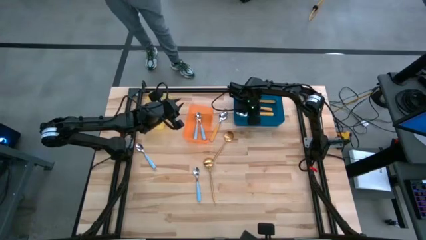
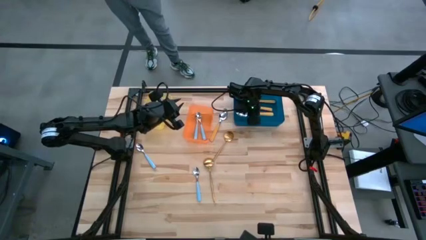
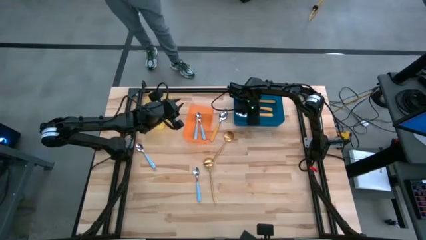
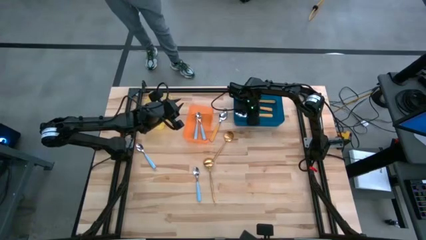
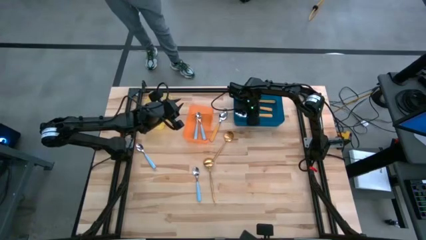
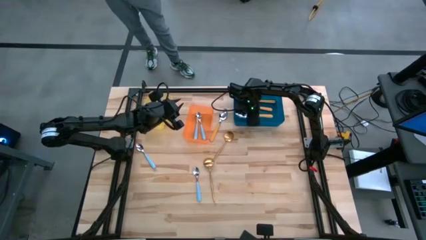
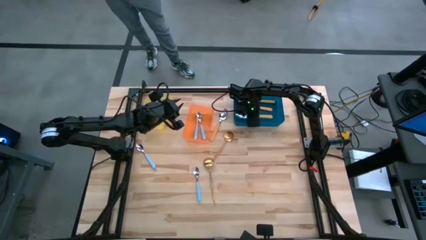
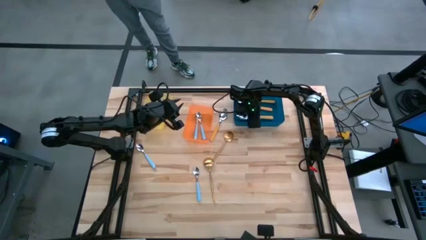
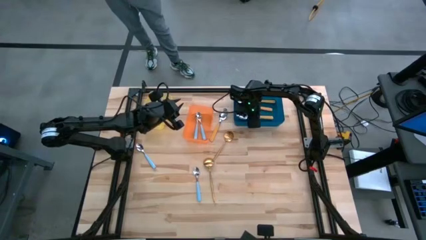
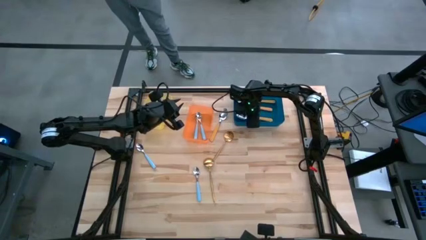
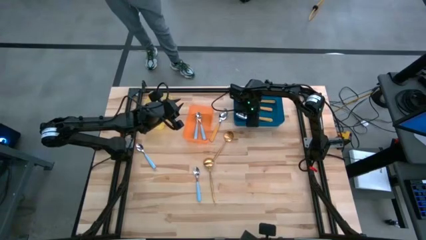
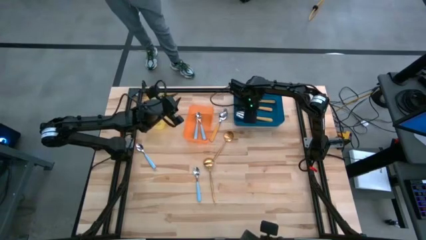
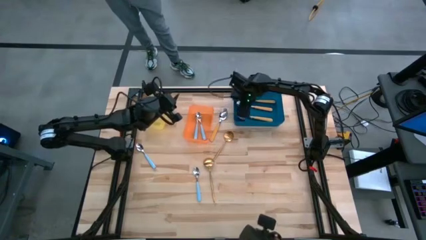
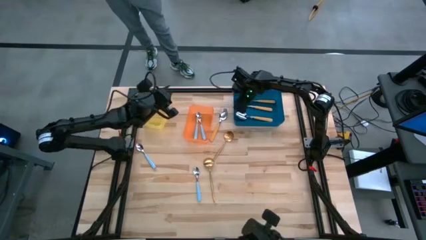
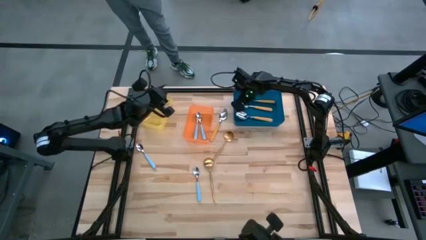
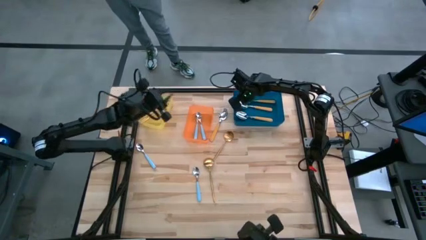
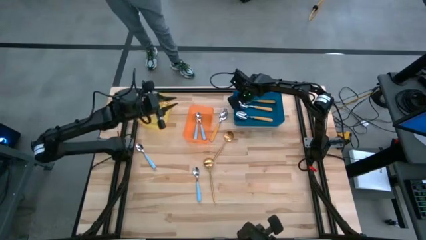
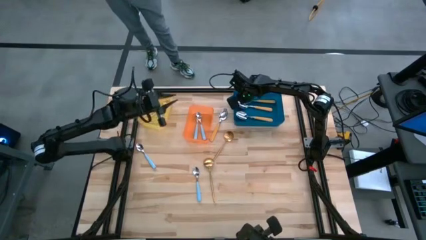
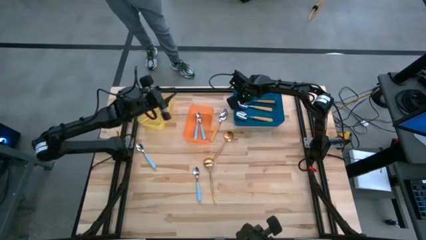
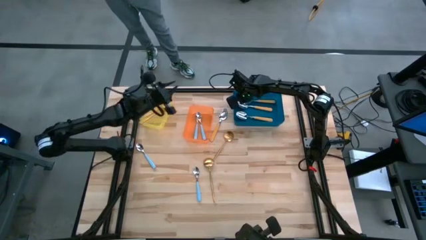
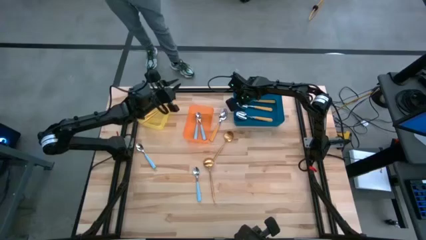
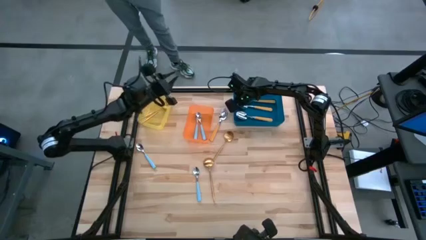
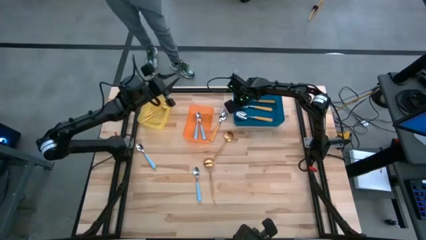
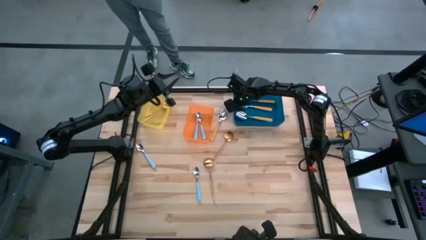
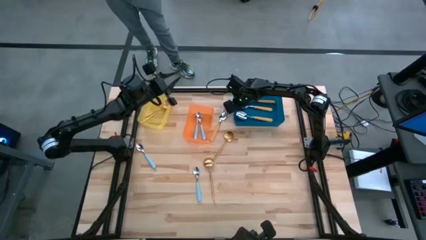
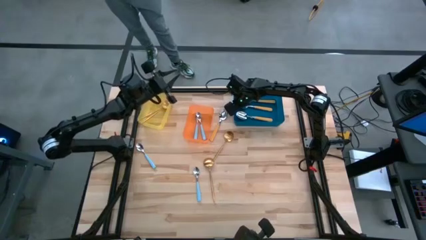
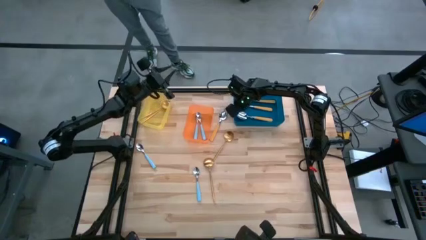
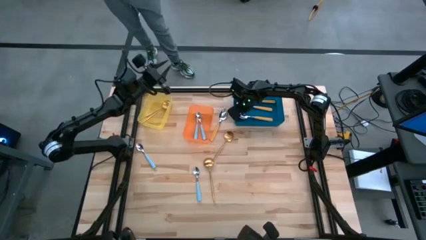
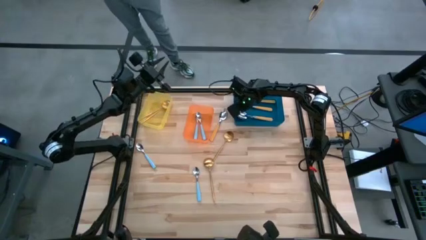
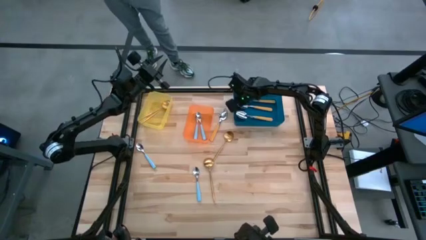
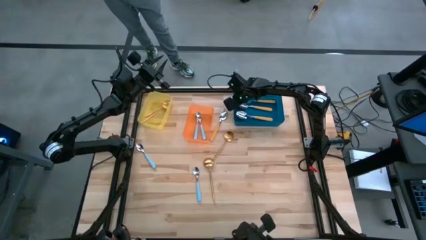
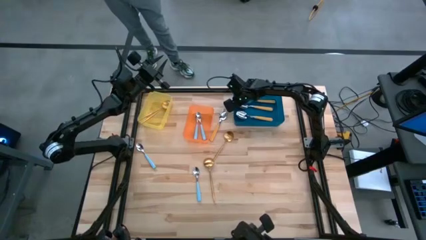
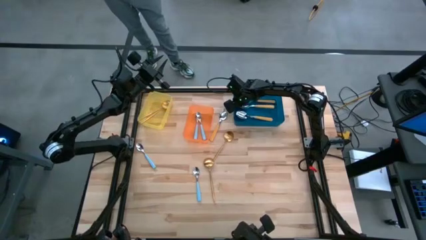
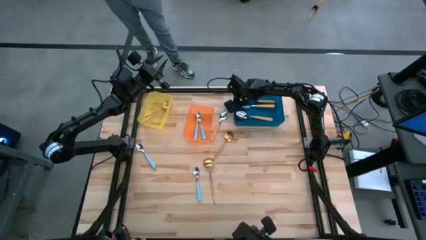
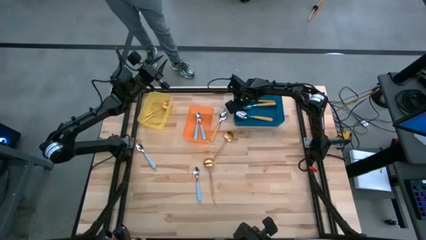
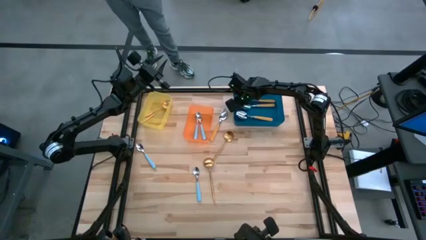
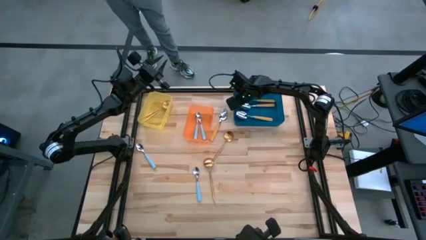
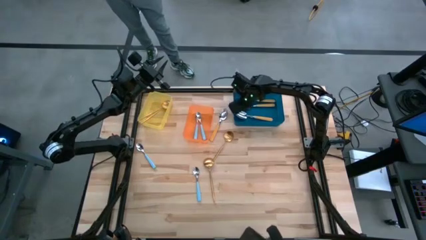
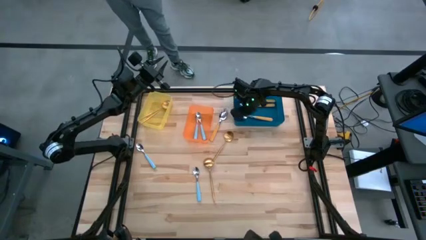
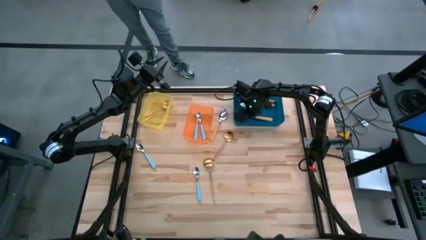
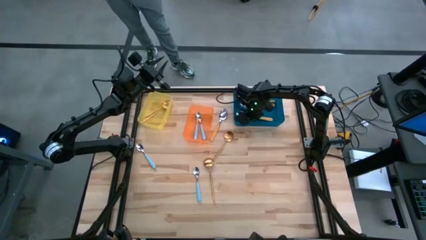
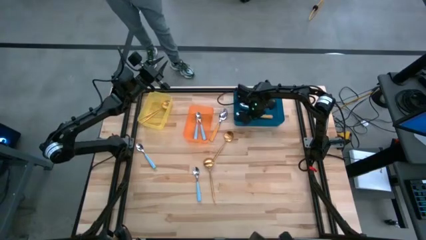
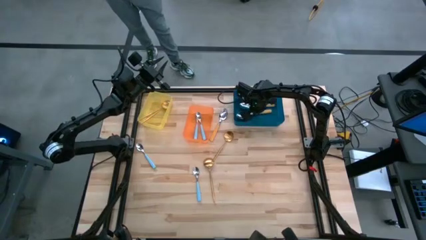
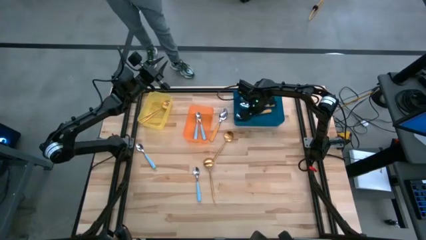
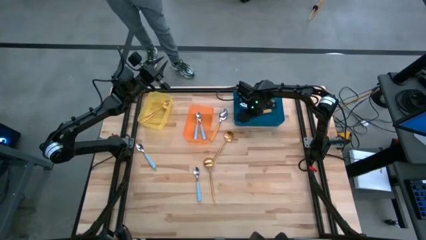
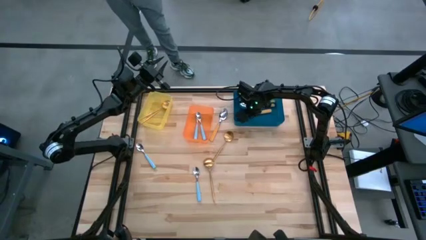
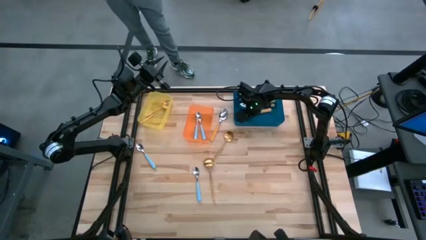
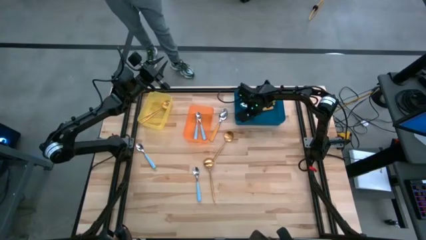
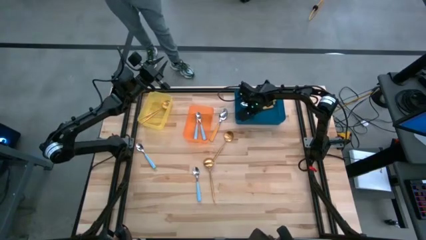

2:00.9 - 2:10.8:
Task: Sort silverware by color (type)
Put the yellow spoon into the blue bin

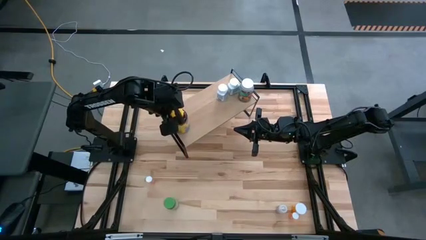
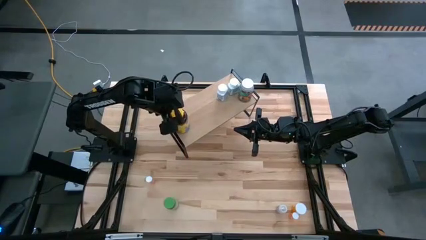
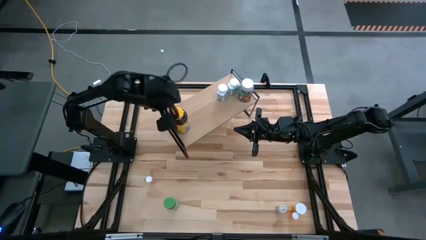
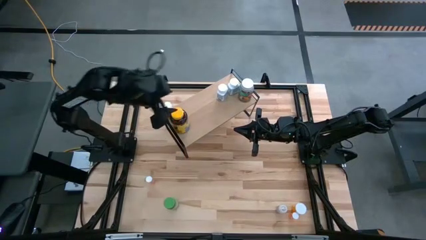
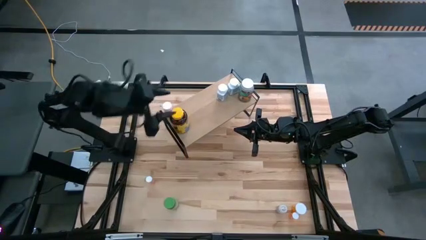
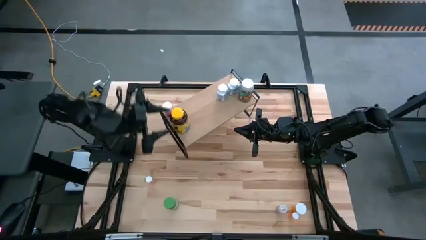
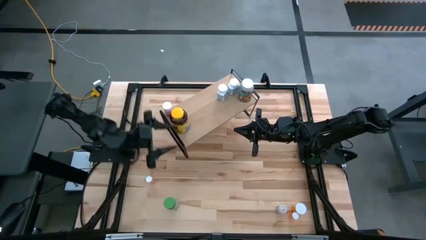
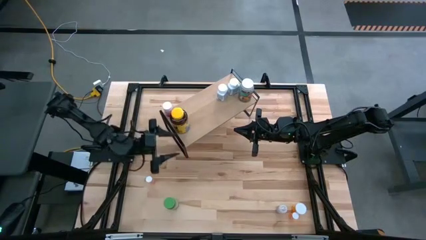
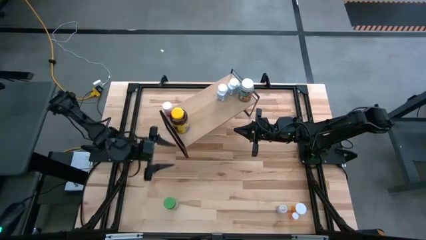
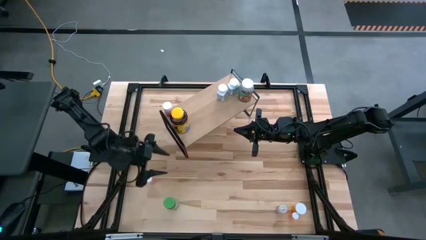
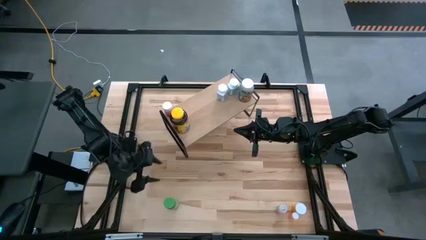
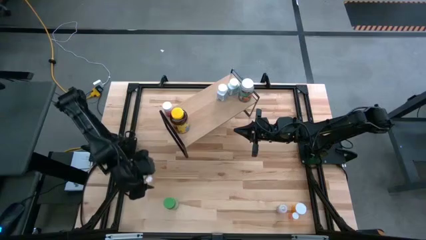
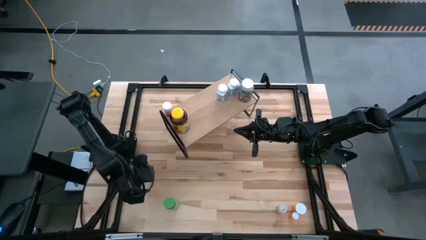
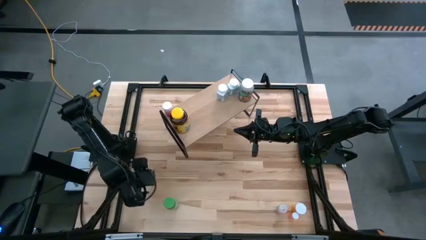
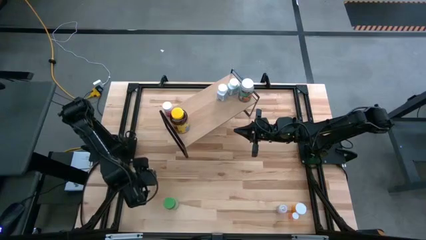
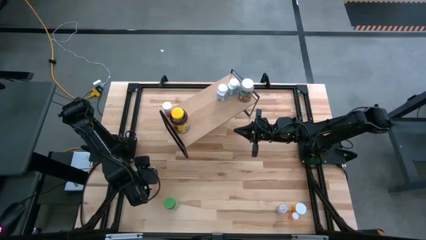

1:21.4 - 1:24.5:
Task: Pick and place medicine bottles onto shelf by color
Put the left light pink medicine bottle on the shelf
